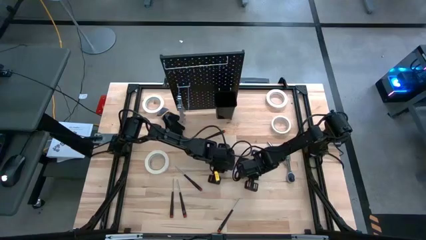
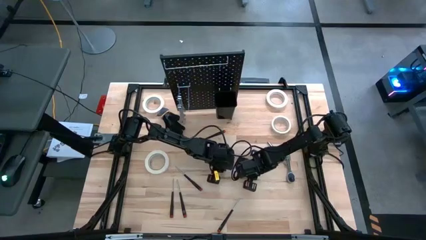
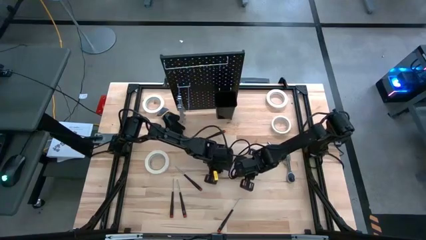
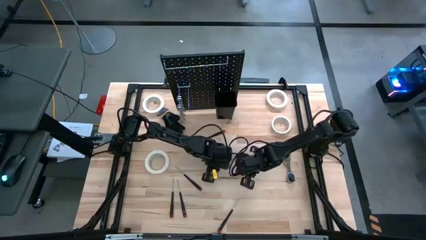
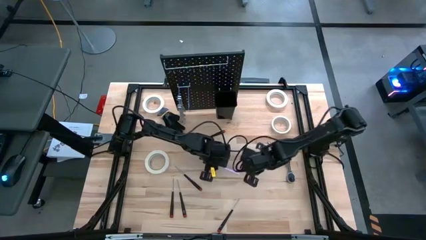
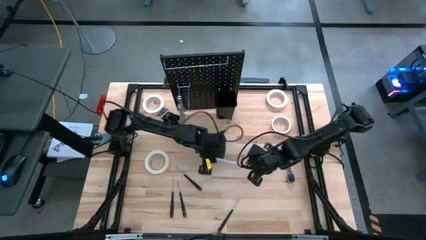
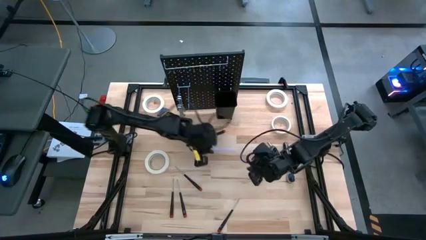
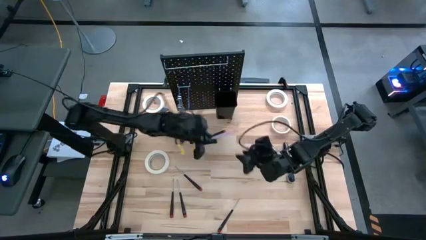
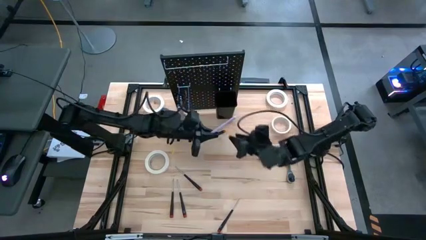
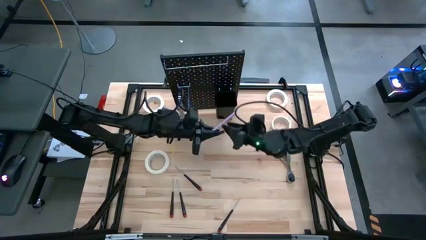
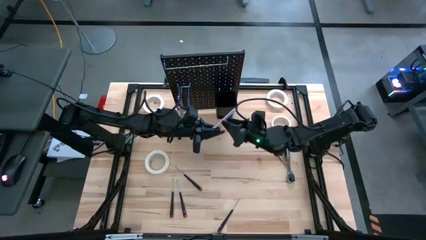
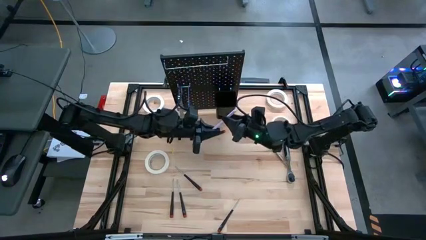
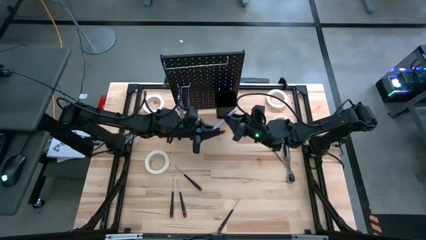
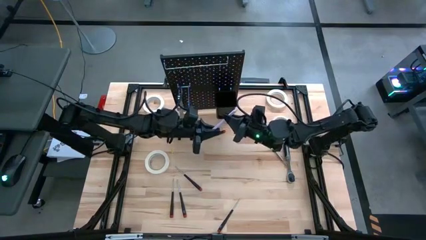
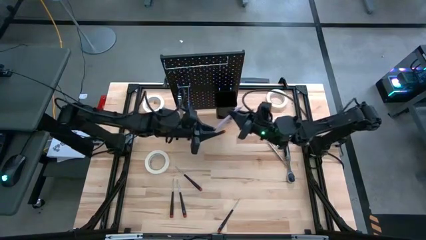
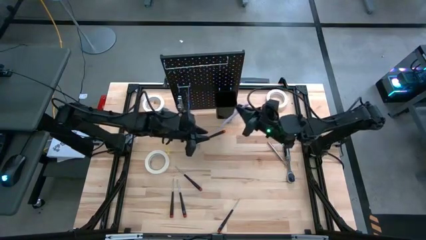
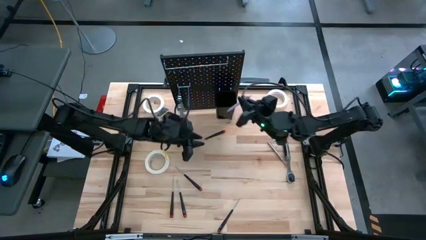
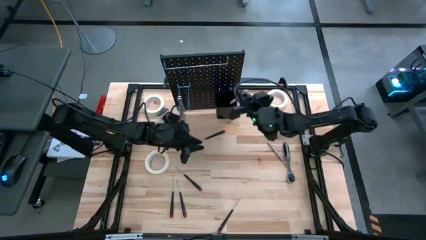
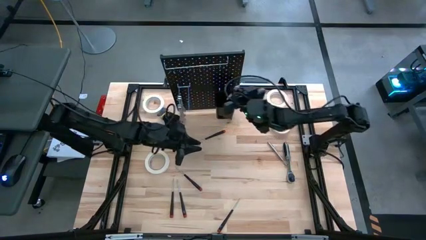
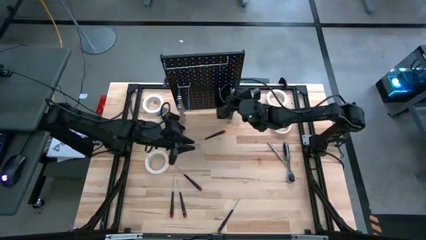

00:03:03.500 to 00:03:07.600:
Task: Hang tools onto peg board
Put the purple pen into the black bin on the peg board

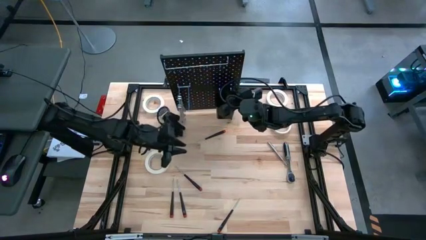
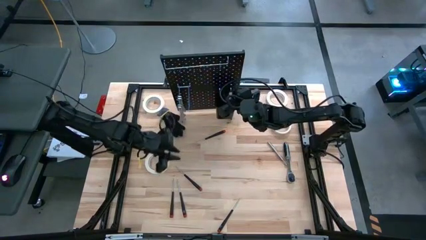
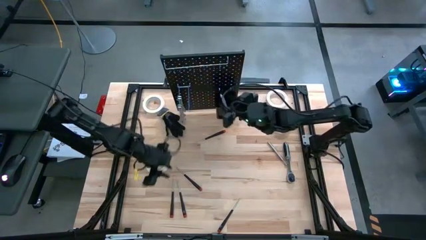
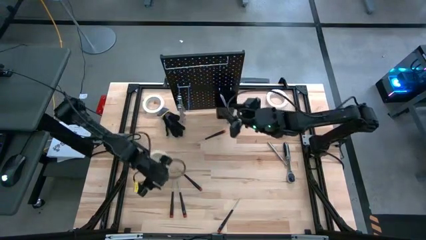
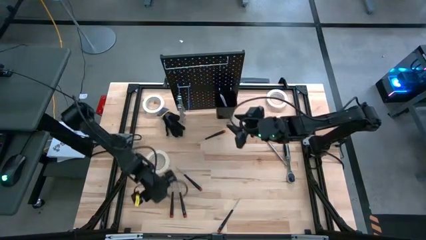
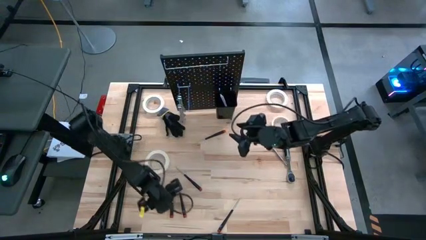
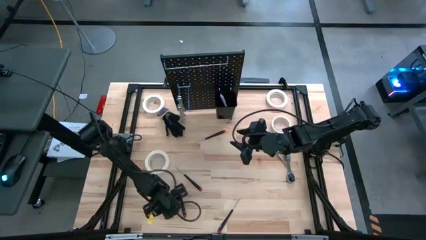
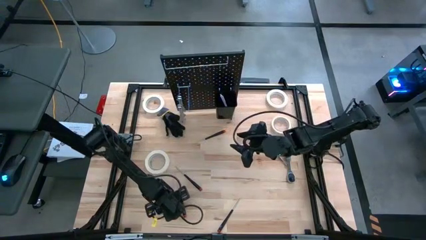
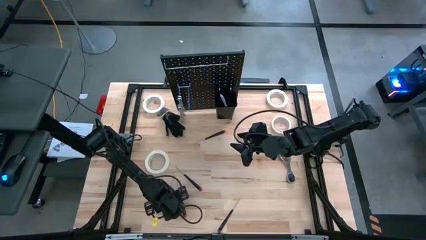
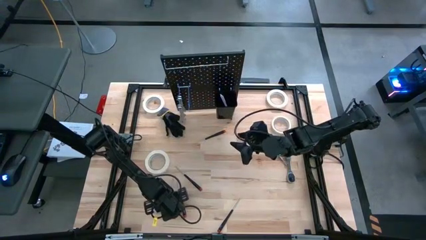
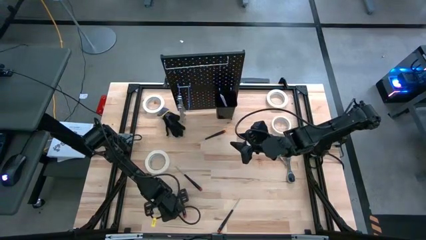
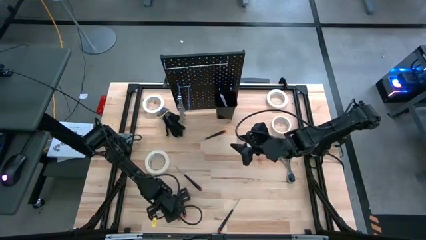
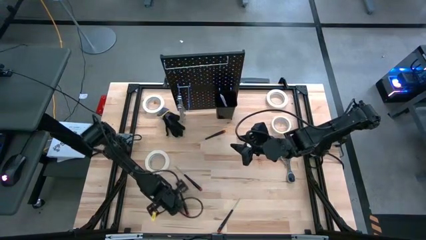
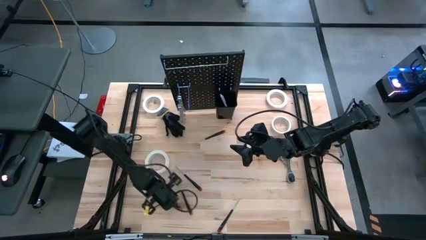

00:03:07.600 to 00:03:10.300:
Put the black nut driver into the black bin on the peg board

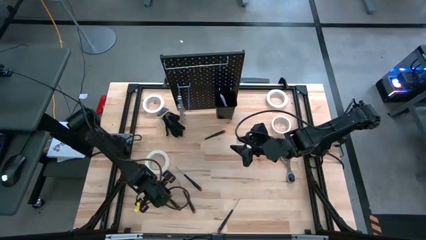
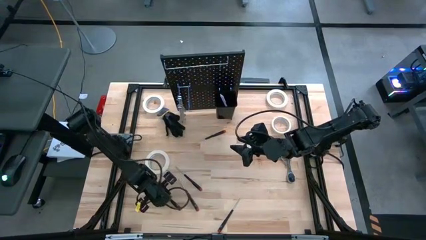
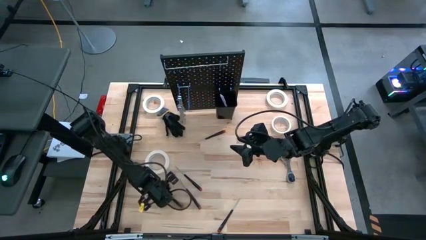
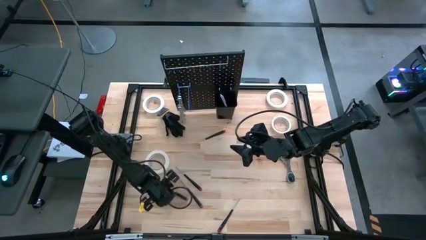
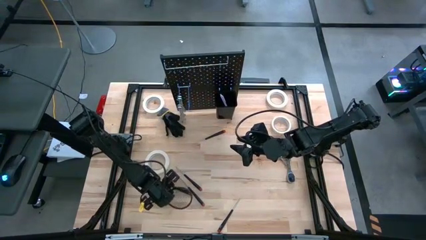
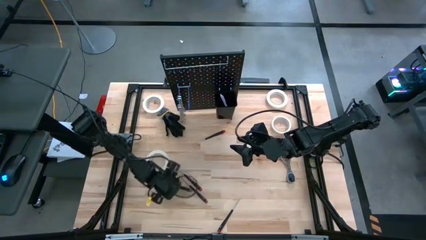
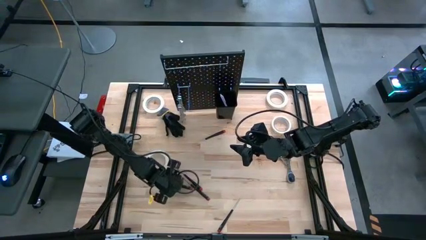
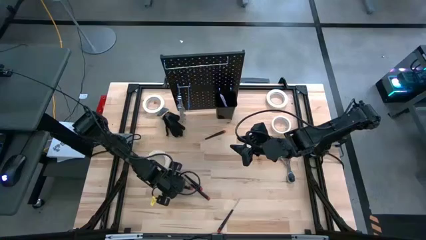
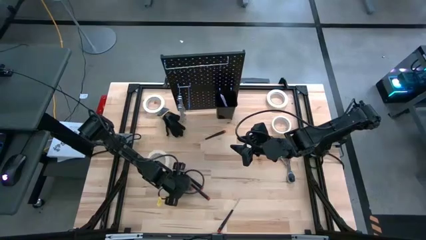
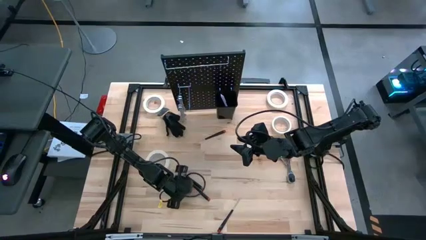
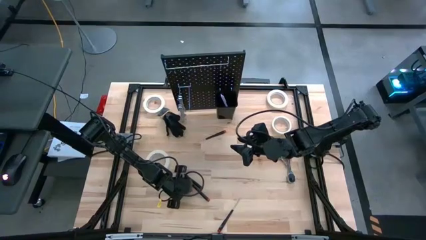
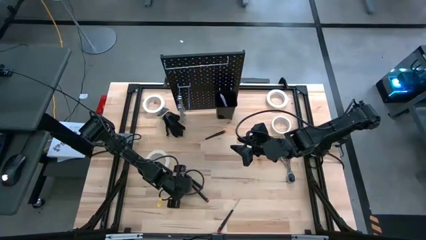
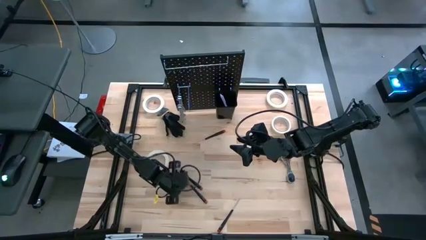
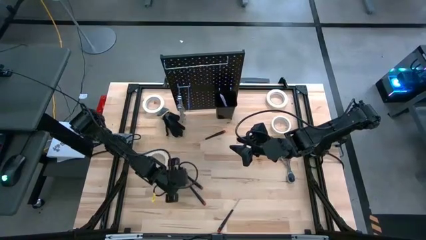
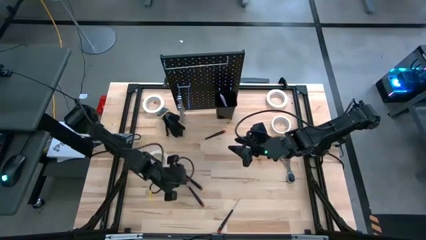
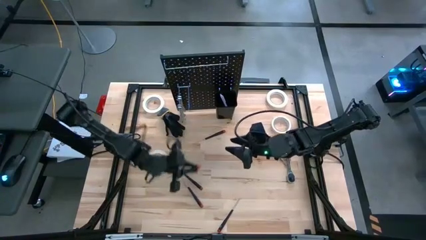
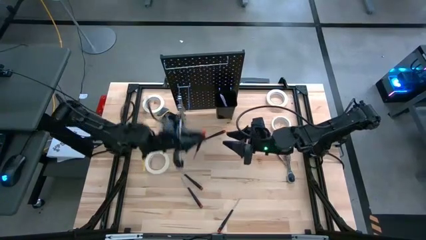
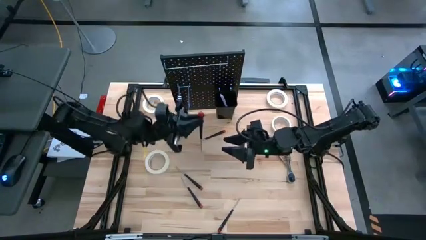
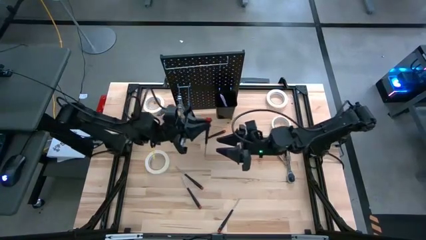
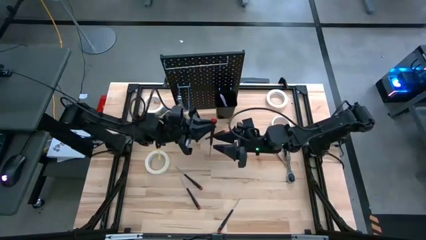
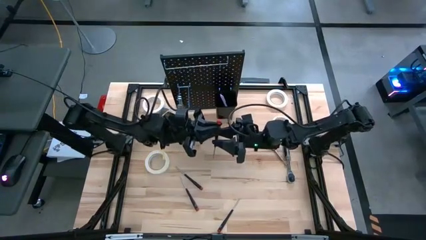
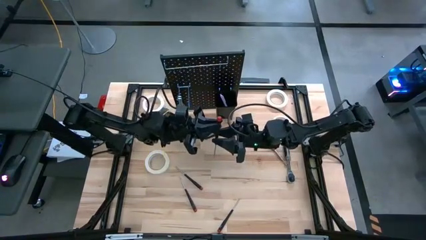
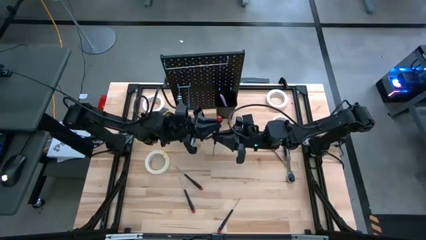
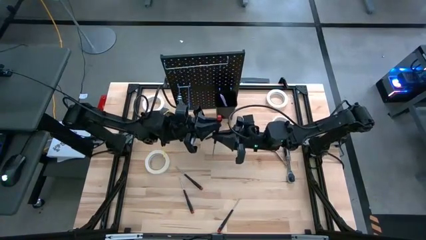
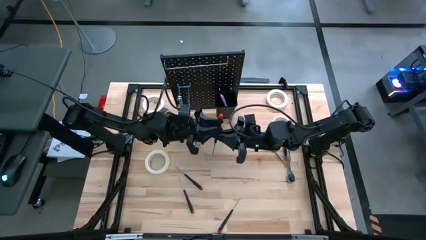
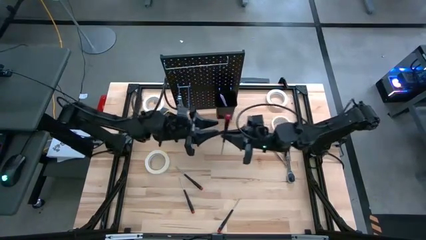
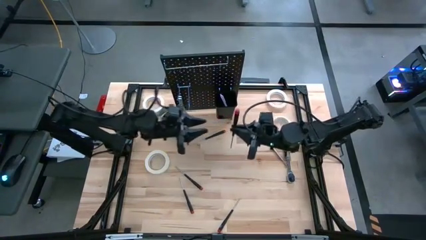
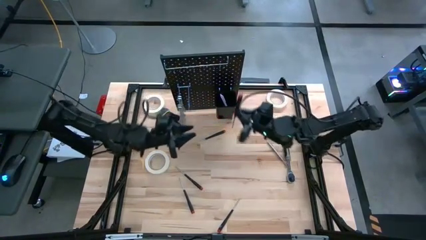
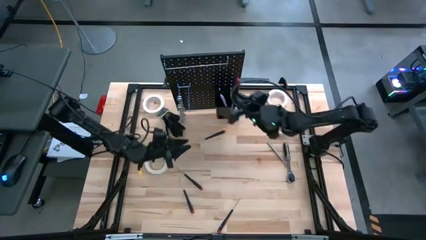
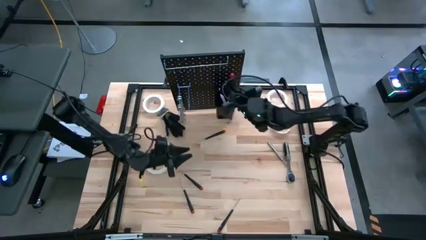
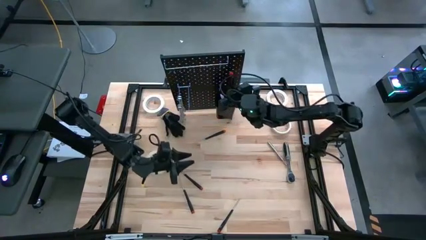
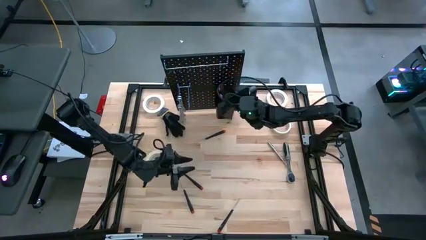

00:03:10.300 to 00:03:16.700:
Put the black nut driver into the black bin on the peg board

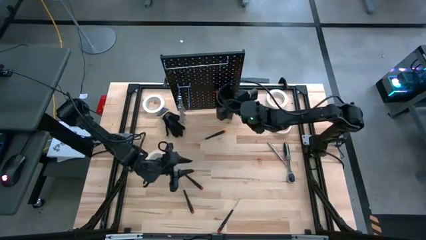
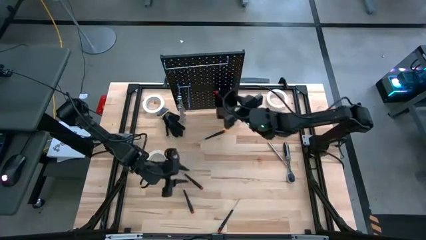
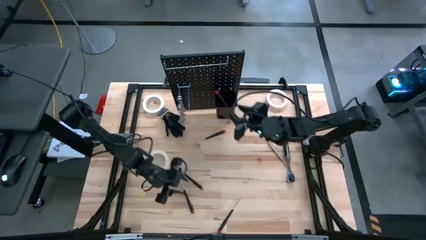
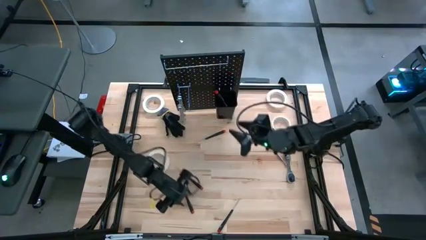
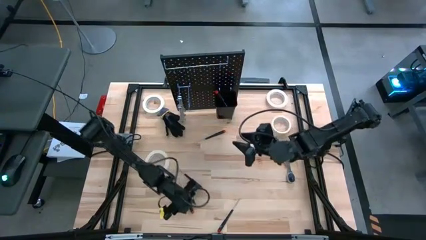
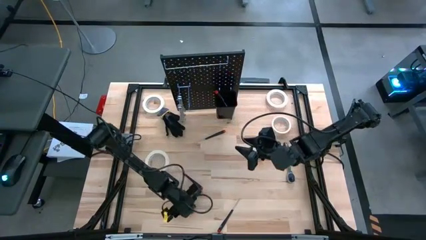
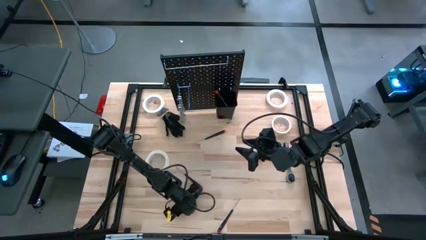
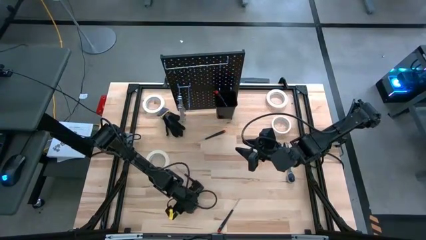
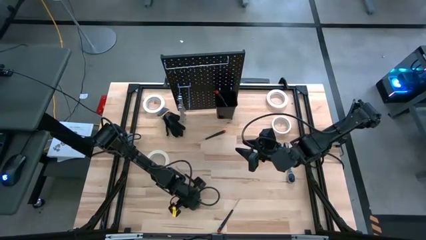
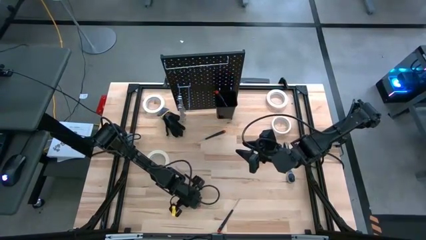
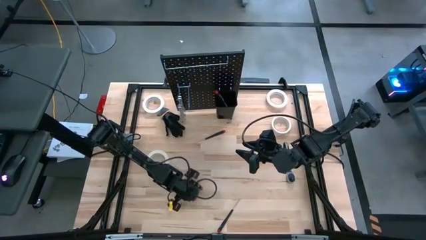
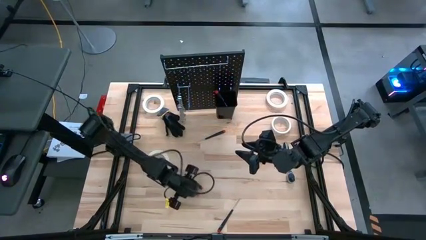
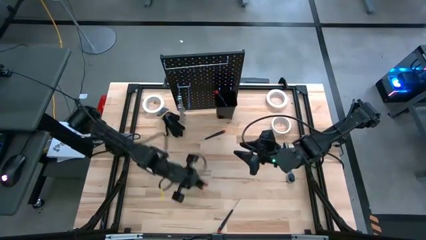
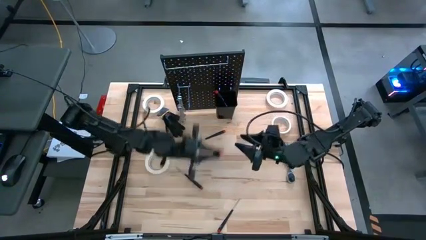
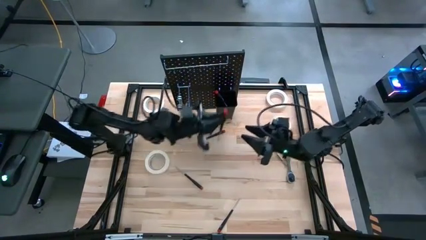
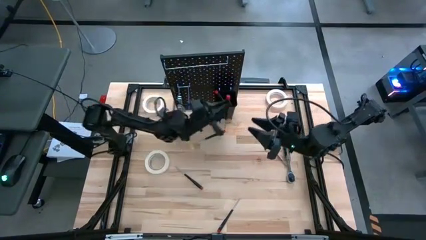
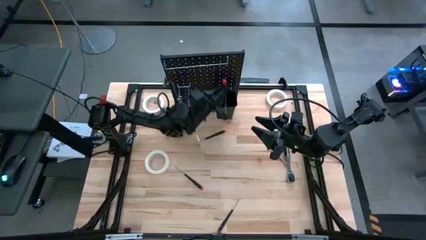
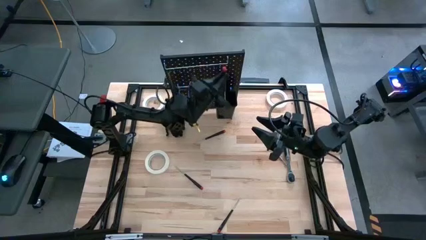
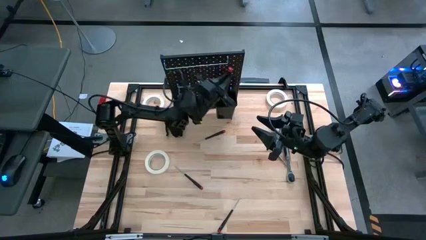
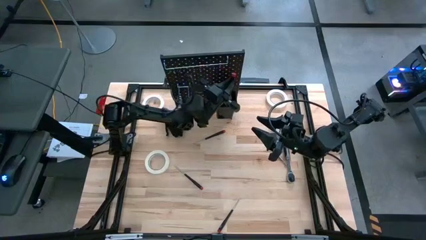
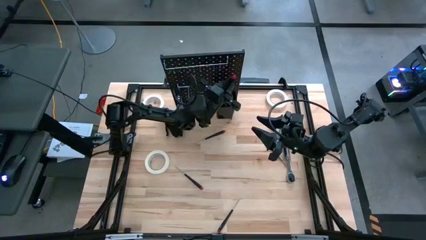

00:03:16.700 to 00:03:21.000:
Put the black nut driver into the black bin on the peg board
